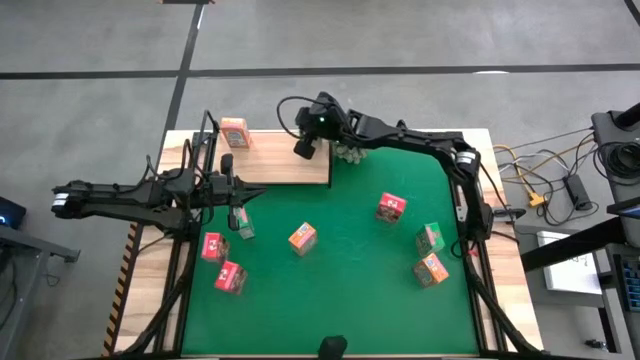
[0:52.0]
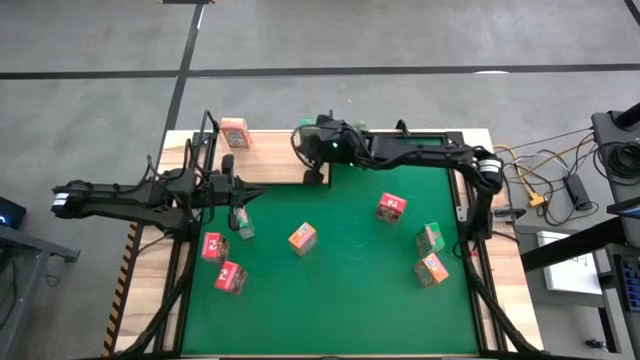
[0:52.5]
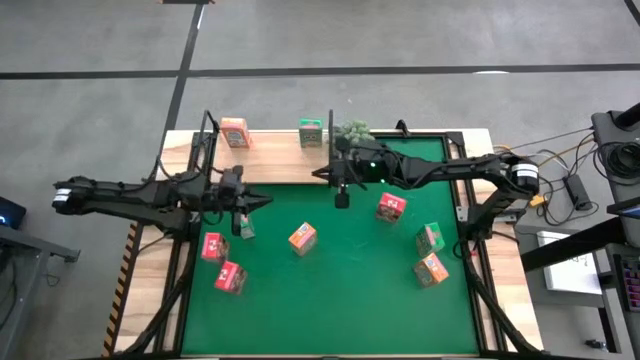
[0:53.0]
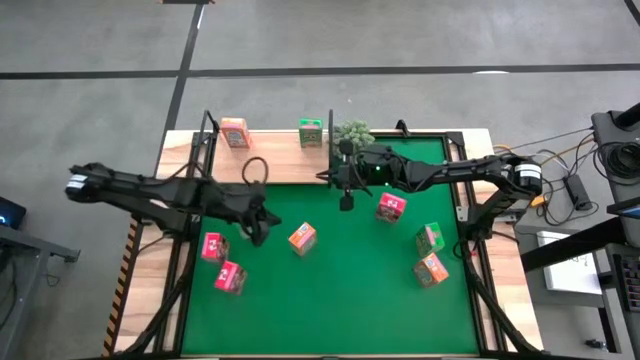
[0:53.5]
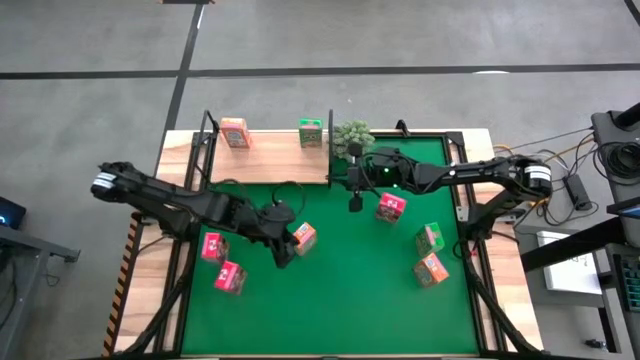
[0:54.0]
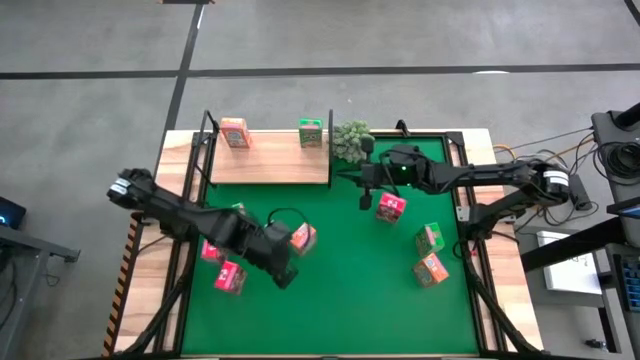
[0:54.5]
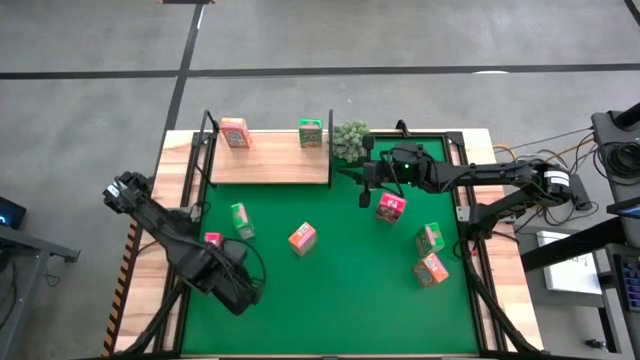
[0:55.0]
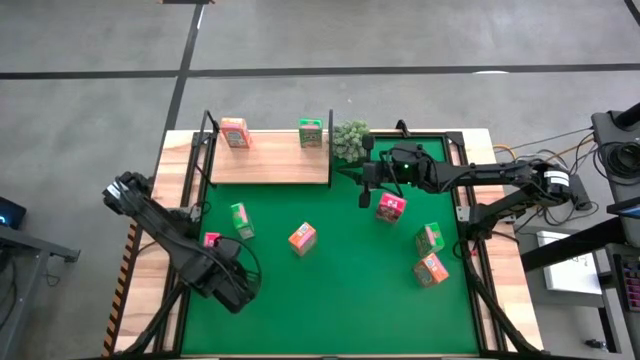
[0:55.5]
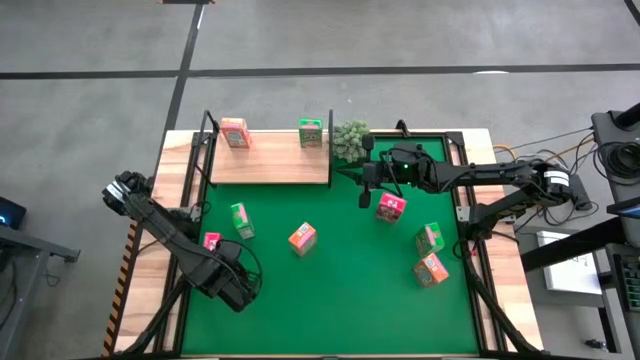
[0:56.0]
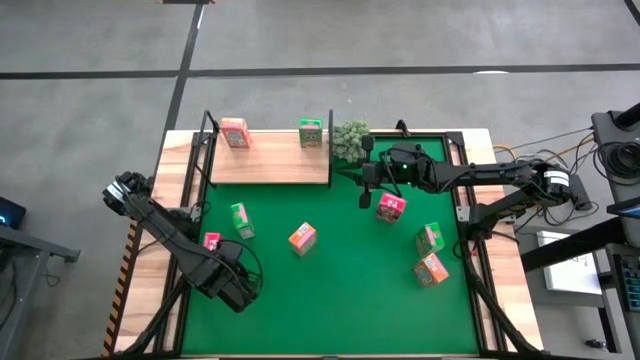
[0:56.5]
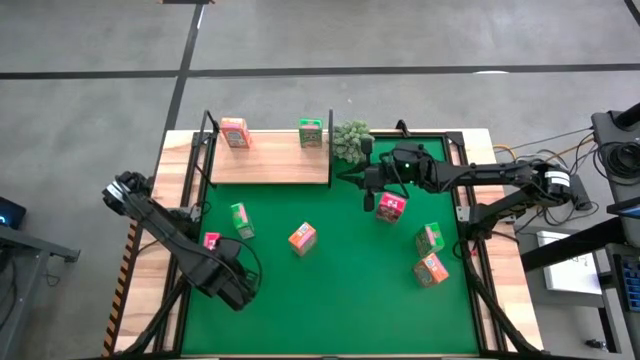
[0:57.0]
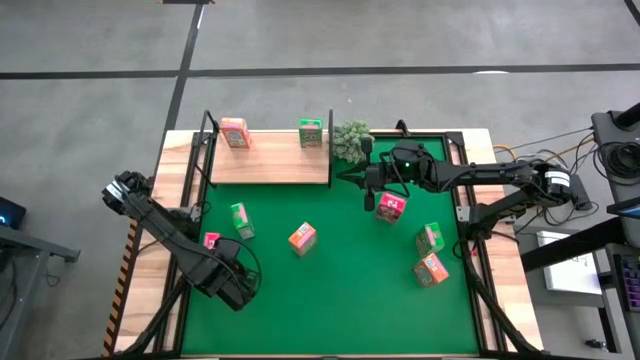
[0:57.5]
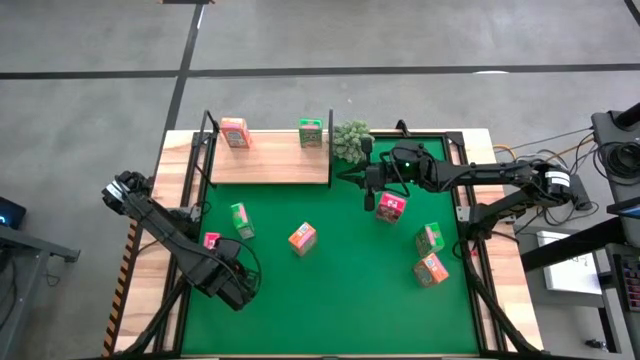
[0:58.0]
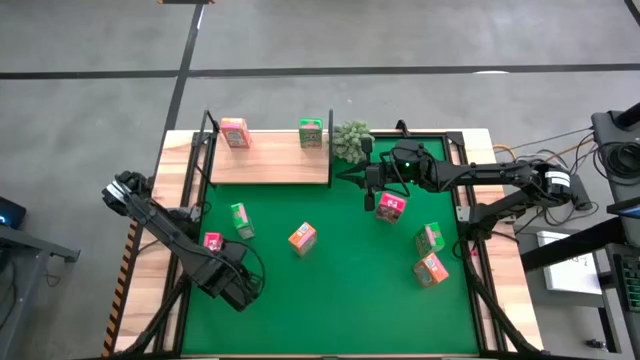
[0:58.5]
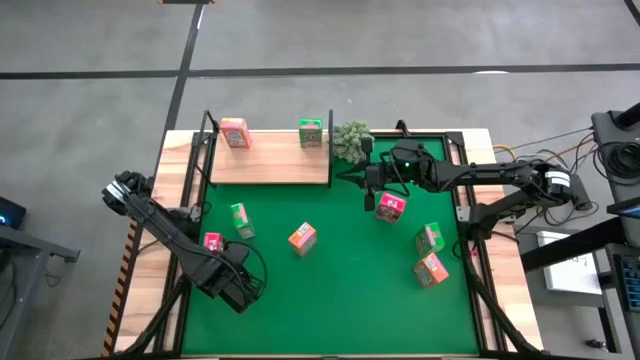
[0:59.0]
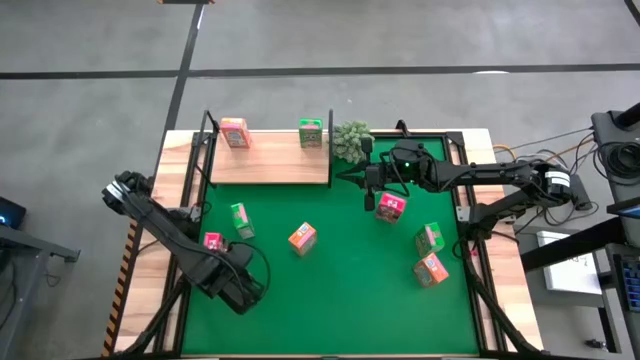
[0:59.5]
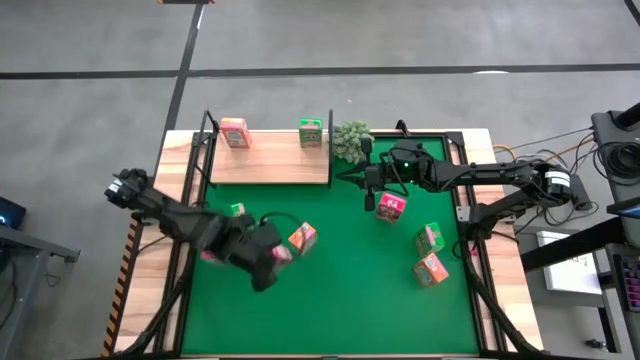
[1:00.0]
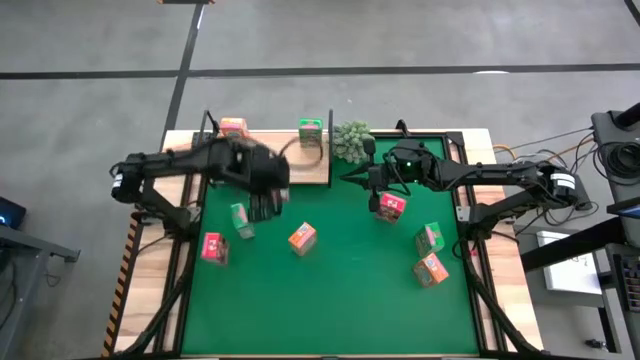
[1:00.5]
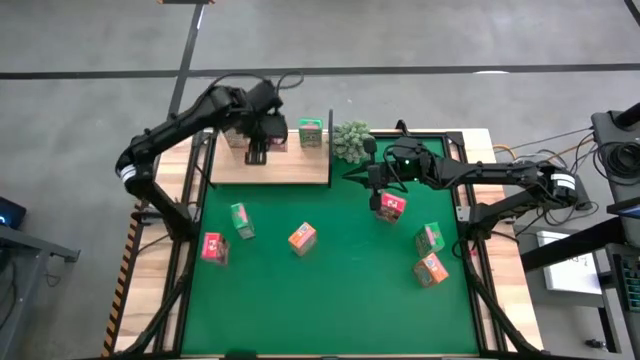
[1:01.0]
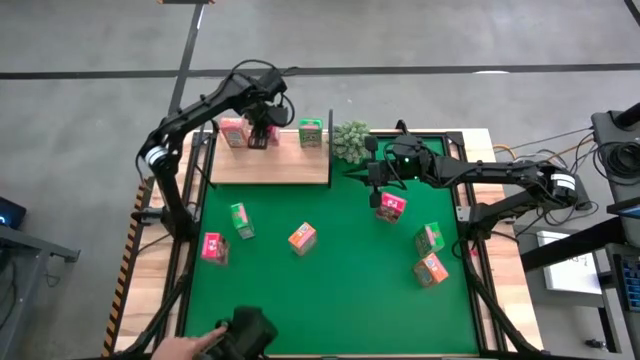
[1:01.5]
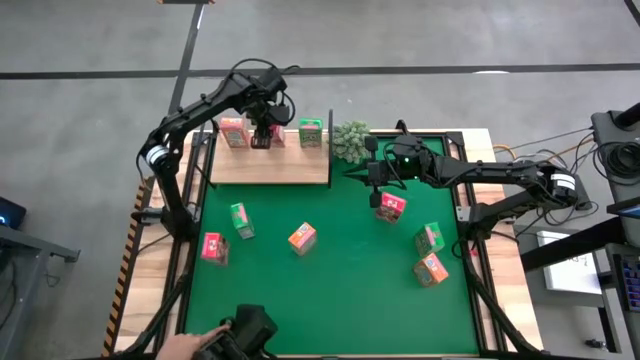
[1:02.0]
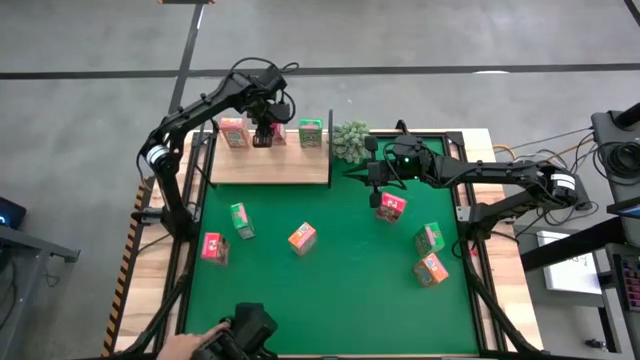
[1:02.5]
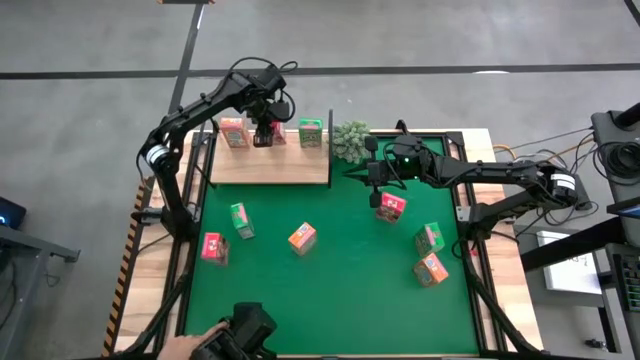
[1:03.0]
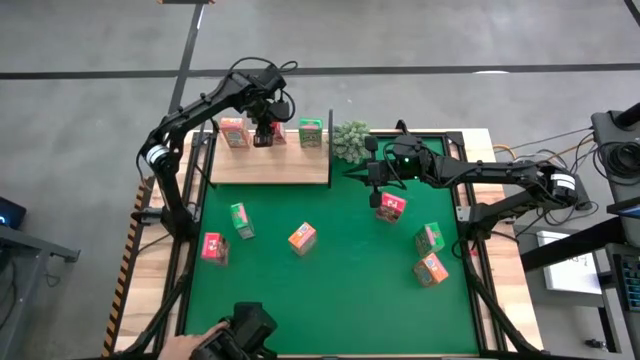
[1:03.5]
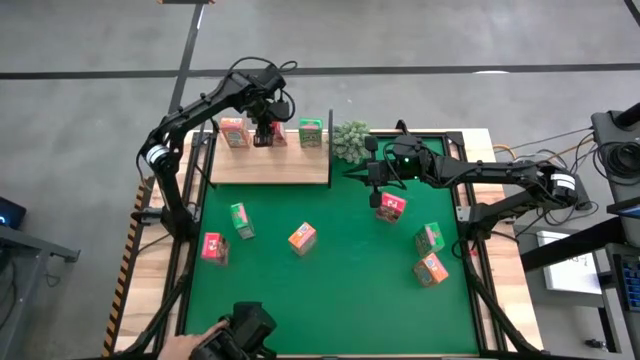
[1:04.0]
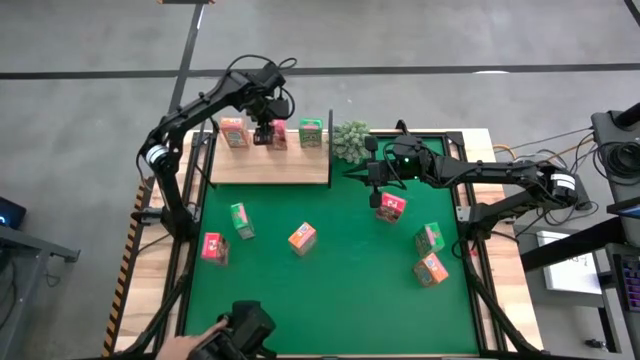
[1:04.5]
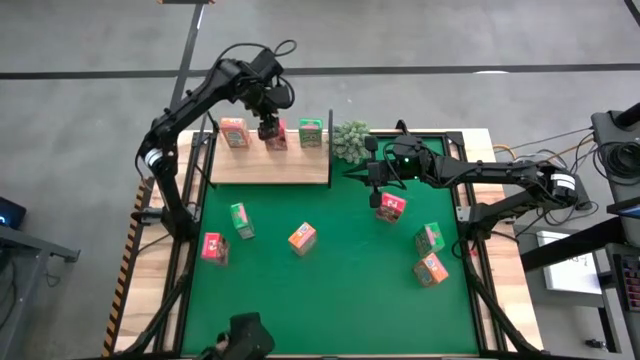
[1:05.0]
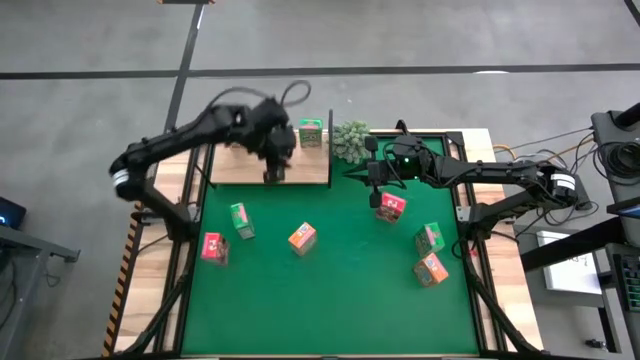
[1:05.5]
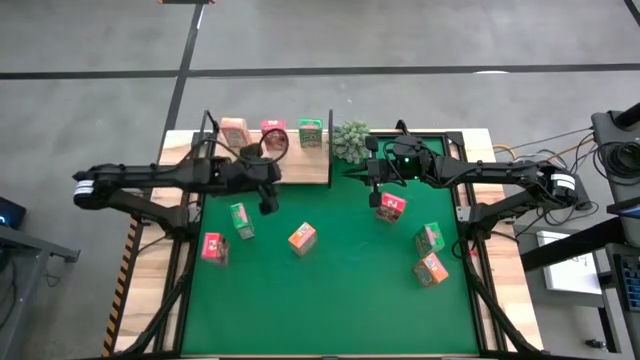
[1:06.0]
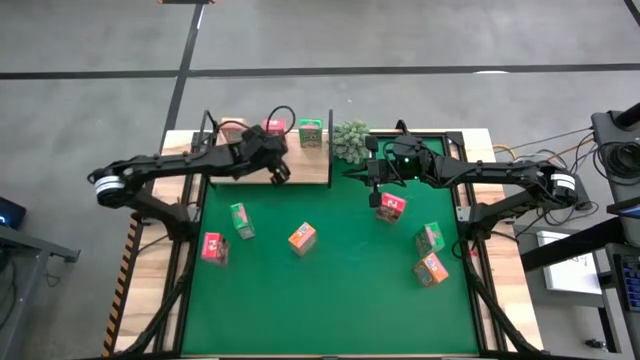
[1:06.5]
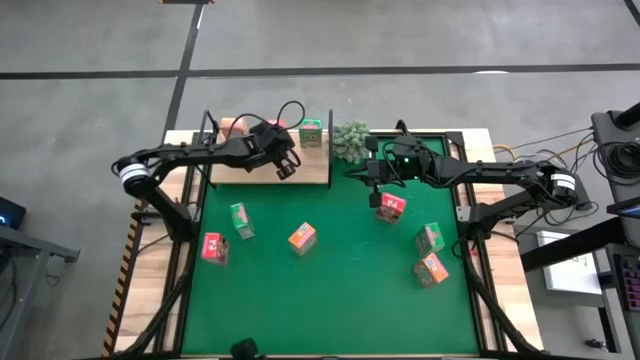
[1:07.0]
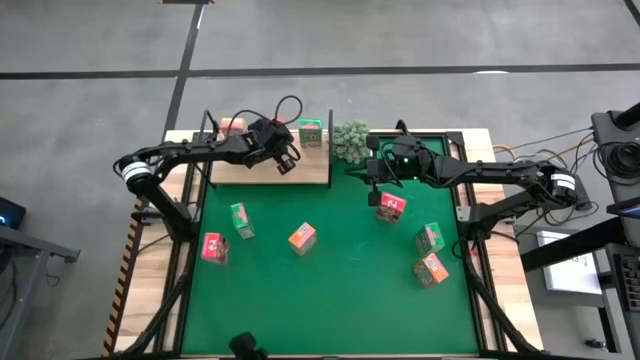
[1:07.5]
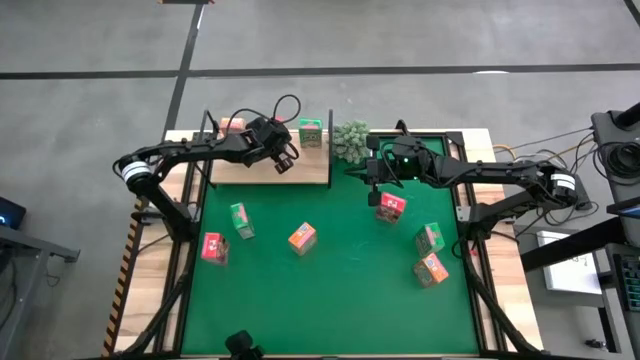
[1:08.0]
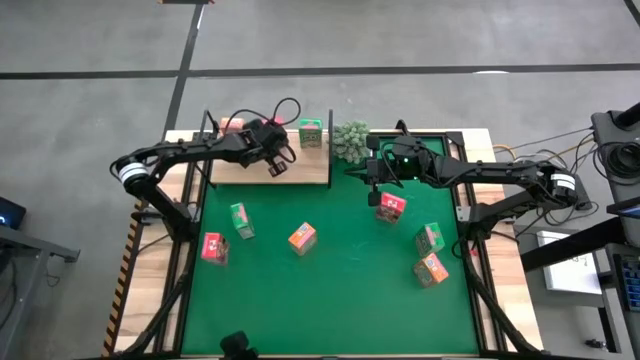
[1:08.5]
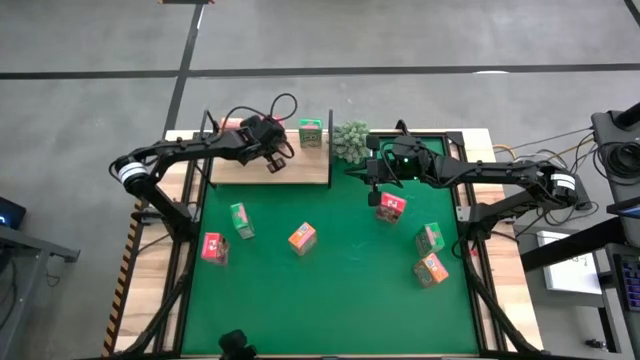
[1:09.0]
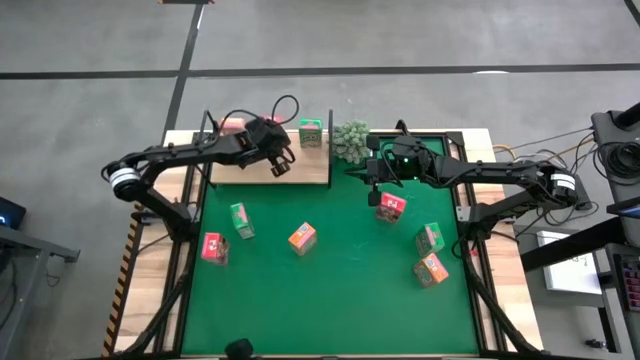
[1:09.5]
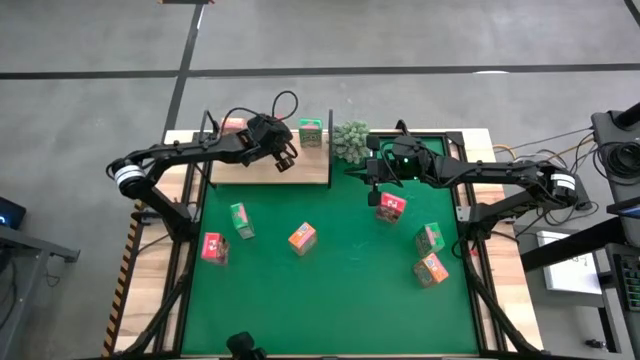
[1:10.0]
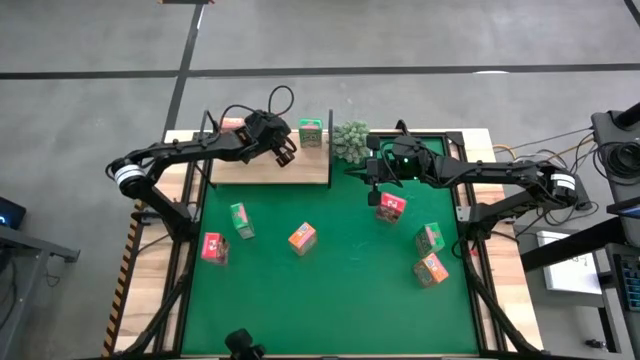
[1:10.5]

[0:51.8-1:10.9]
Task: Stack cereal on shelf
Put the bottom red cereal box on the shelf

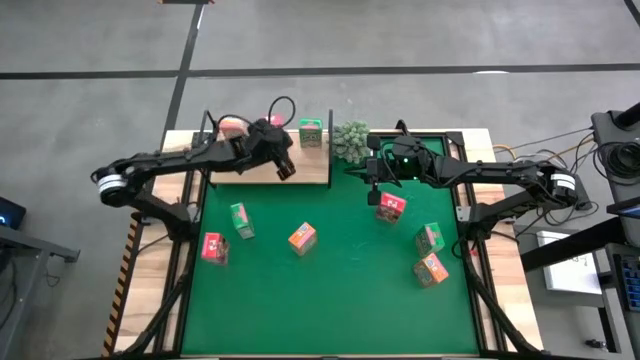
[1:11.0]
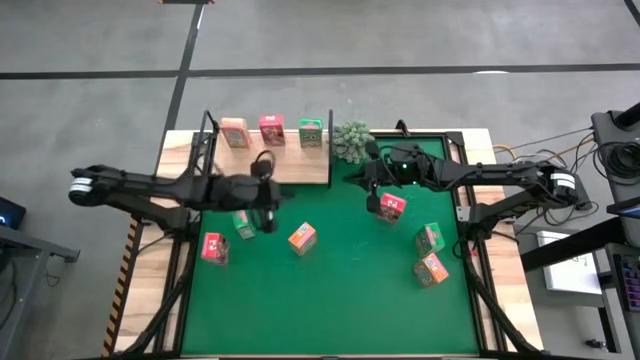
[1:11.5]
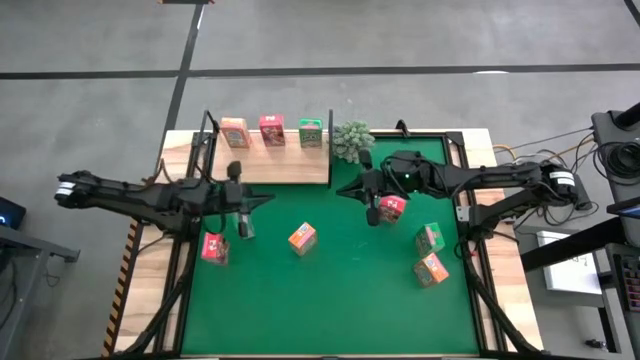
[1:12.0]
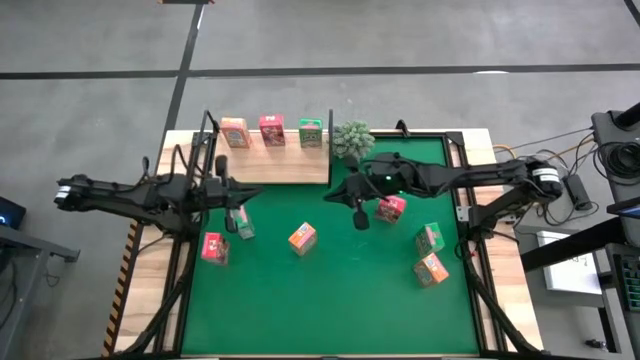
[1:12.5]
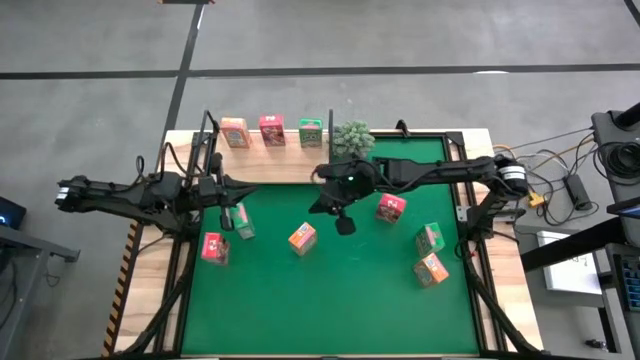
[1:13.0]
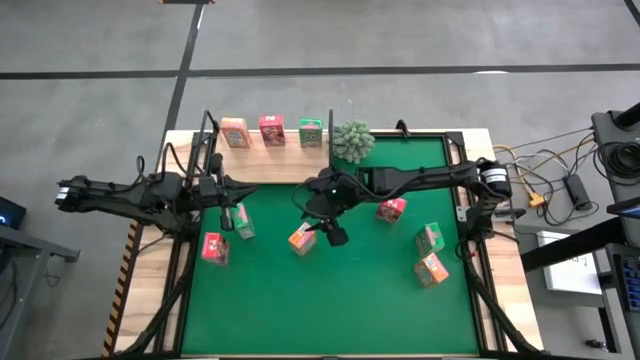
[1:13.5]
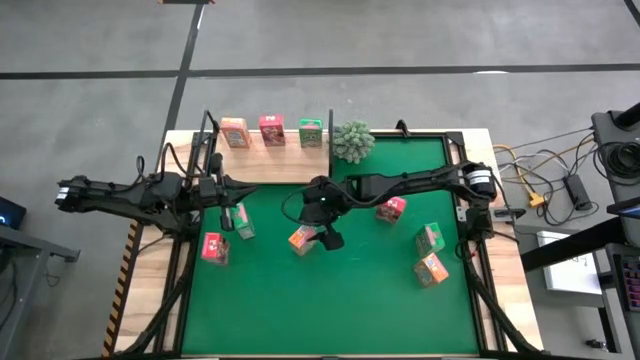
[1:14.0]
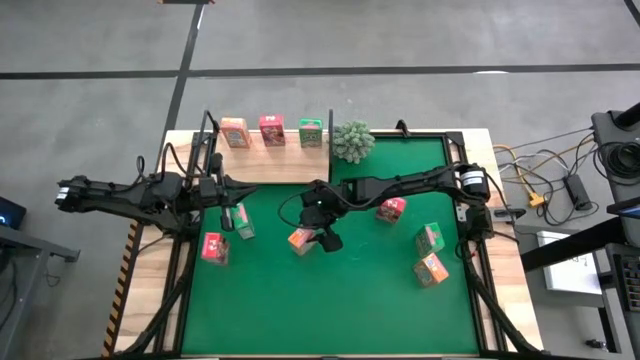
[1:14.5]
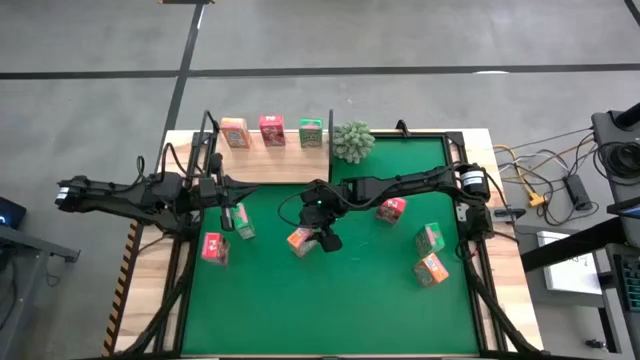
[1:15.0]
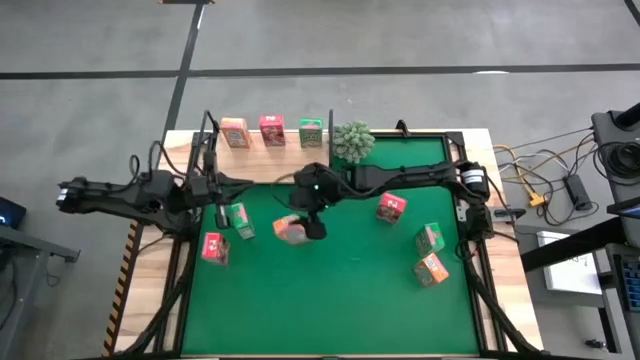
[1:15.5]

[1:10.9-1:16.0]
Put the left orange cereal box on the shelf
